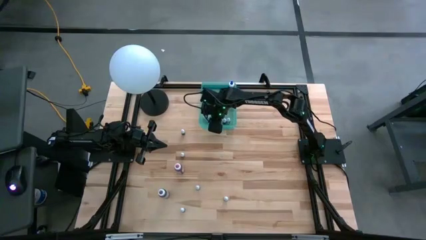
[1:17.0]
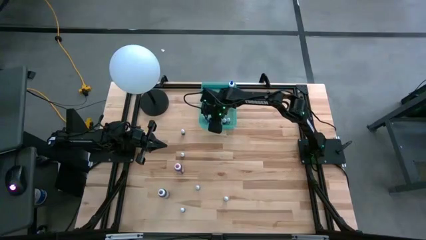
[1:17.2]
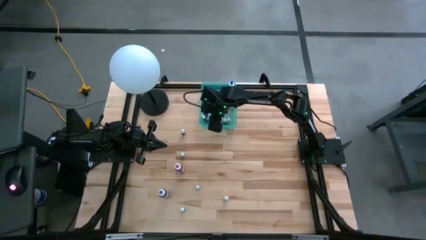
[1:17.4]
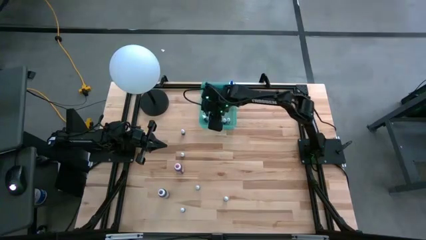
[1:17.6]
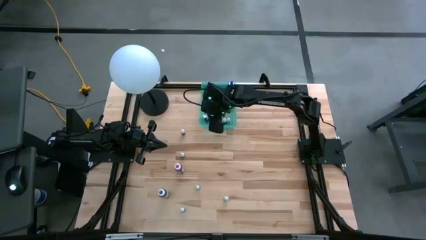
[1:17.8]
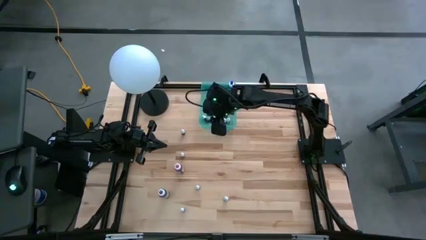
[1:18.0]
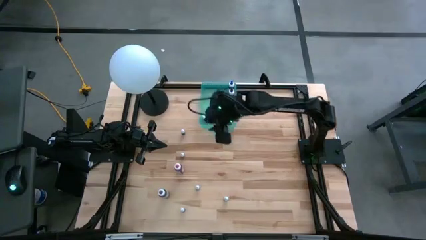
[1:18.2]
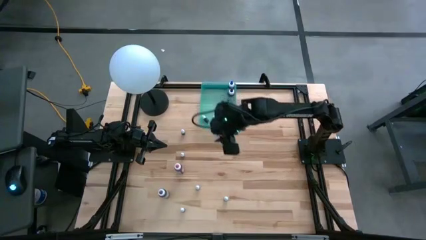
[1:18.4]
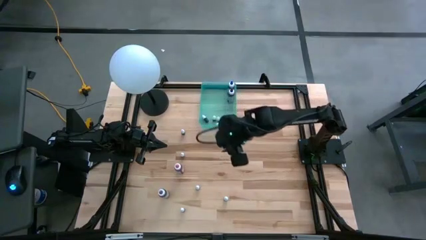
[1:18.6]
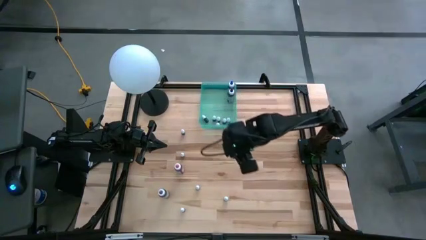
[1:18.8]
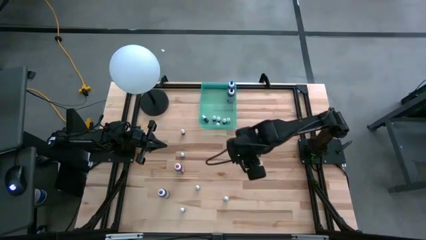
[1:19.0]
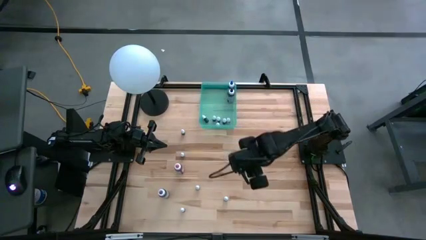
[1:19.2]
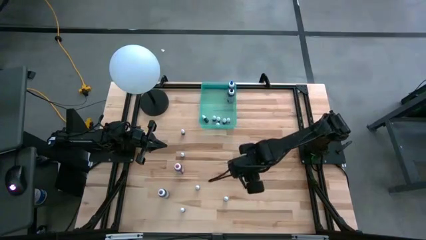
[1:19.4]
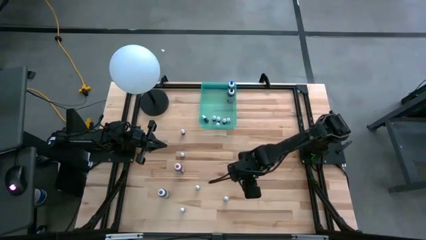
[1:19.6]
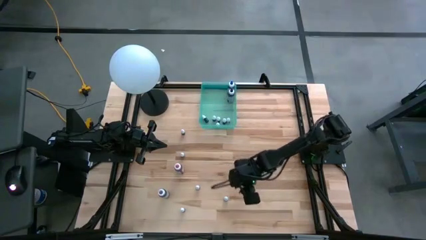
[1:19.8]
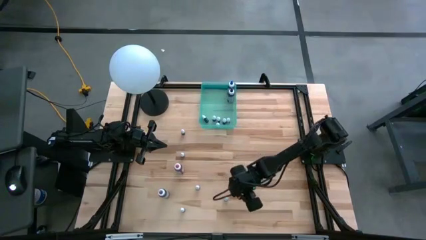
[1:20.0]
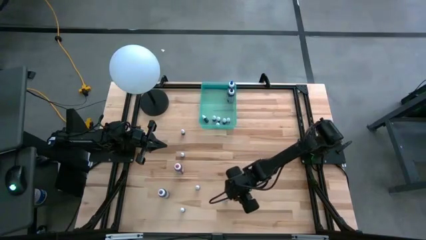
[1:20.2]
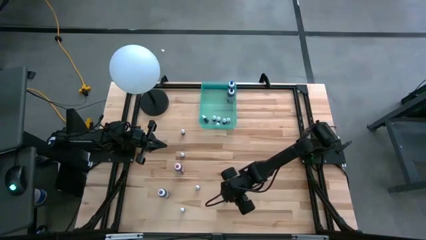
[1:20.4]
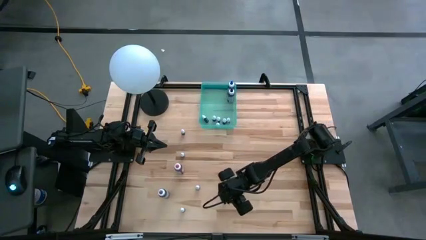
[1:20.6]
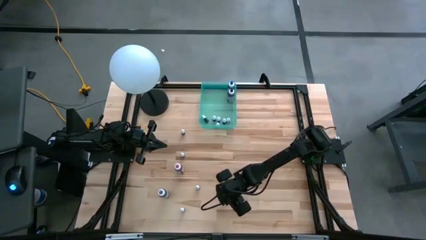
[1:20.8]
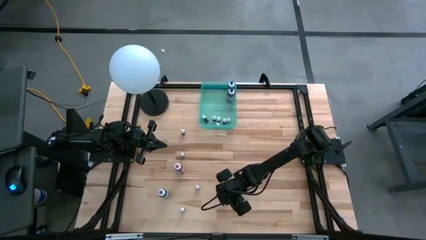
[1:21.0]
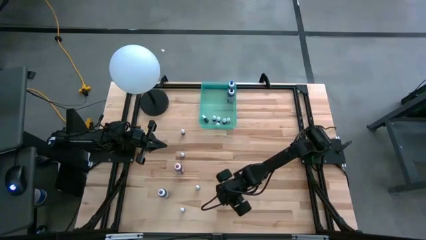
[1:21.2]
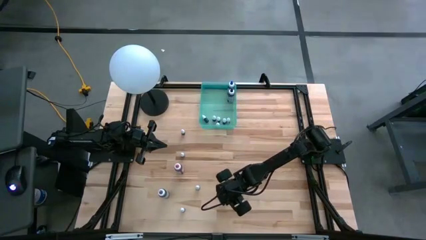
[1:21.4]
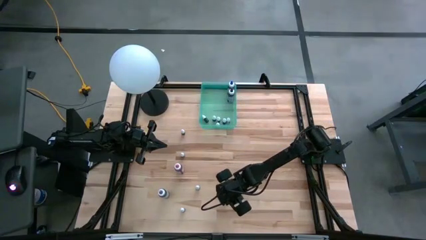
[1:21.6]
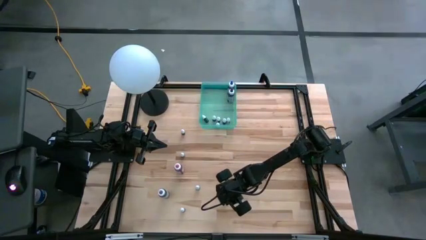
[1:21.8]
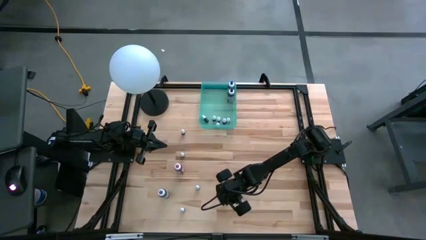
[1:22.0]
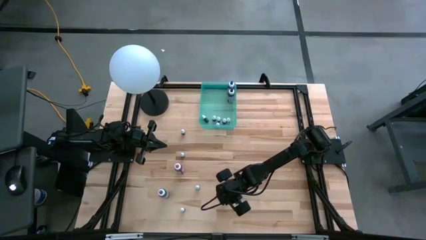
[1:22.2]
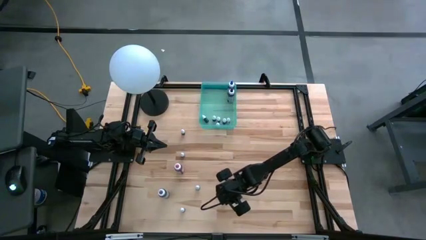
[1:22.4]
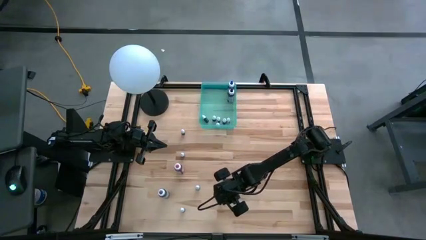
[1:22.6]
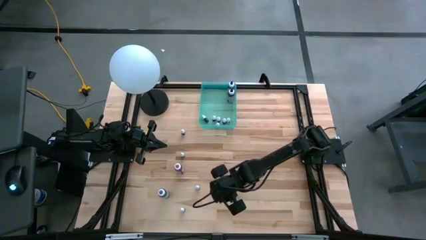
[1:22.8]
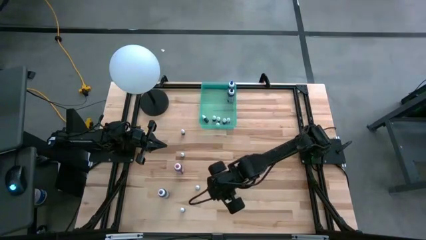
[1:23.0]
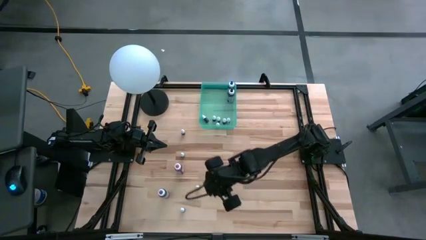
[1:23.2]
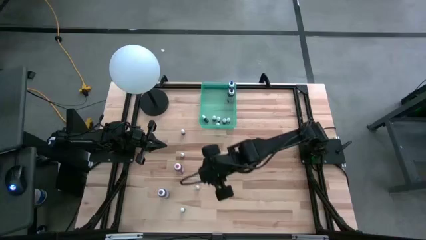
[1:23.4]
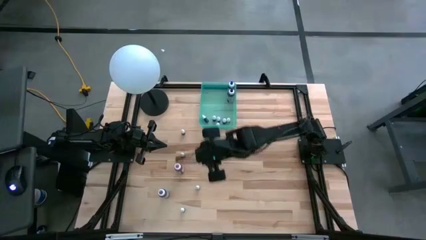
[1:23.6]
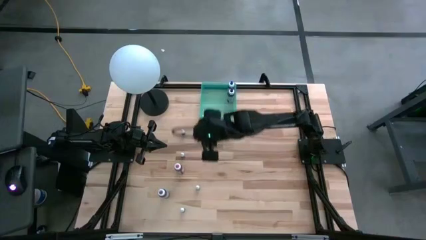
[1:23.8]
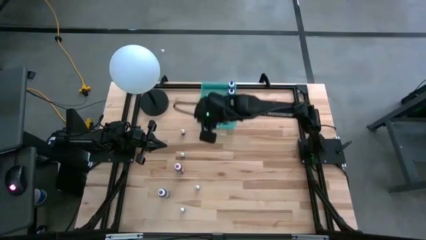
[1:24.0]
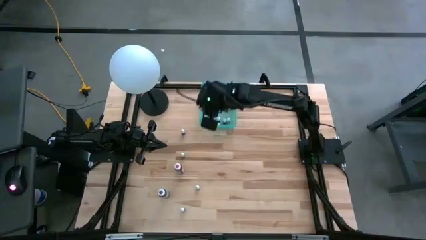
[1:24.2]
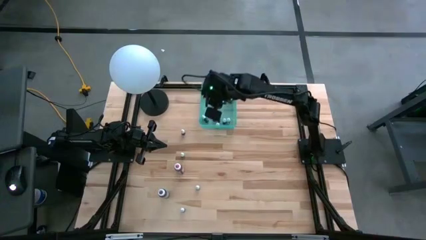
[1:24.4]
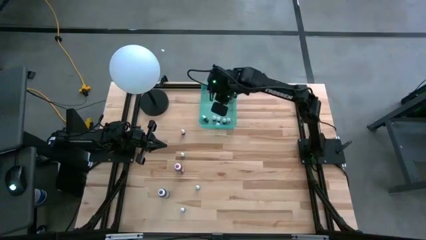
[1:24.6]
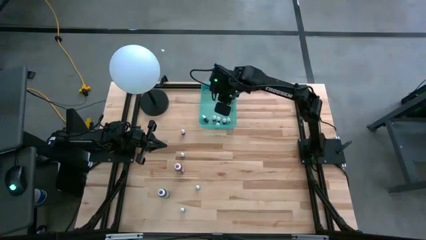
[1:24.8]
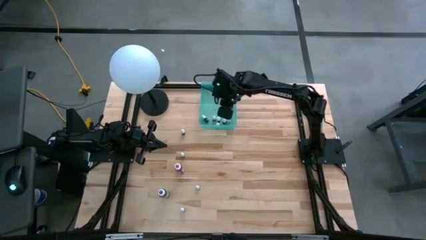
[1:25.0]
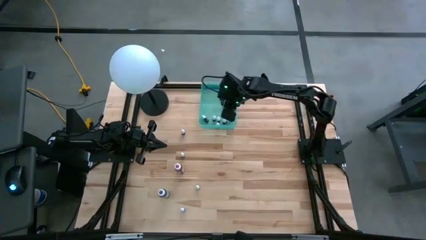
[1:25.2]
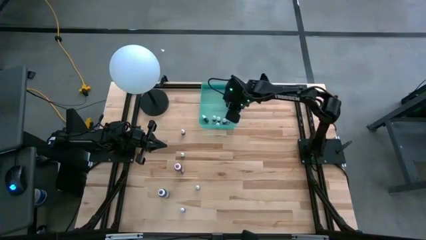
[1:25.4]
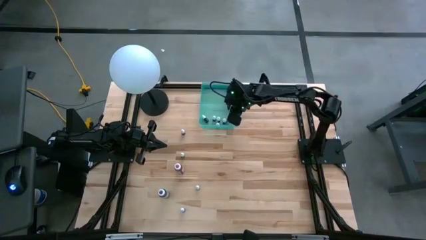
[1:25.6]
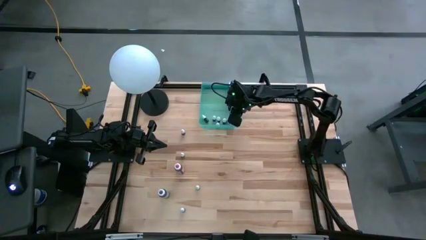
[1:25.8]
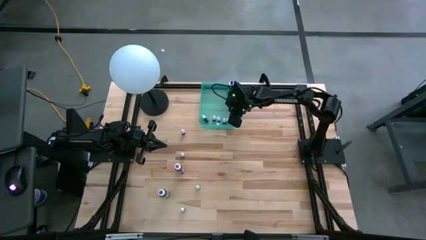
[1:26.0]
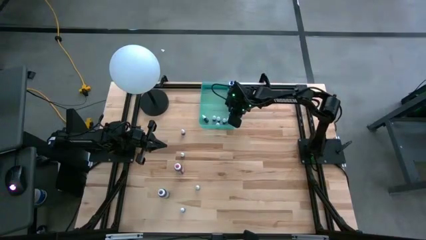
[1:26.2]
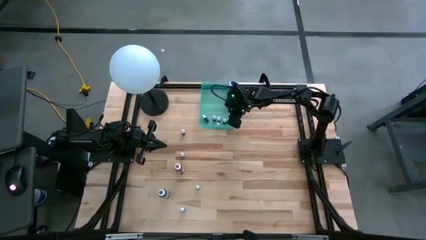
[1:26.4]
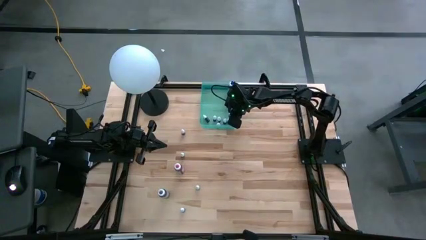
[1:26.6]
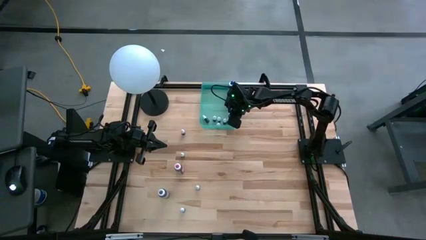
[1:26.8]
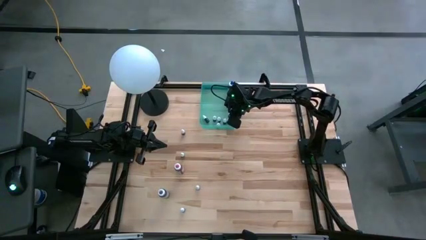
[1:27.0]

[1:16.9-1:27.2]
Task: Pick & Place food coloring
Put the small blue food coloring bottle into the light blue bin

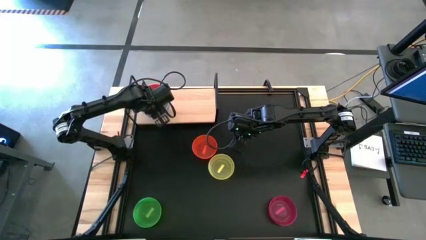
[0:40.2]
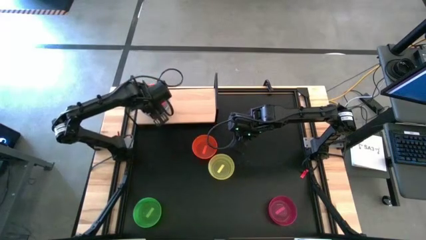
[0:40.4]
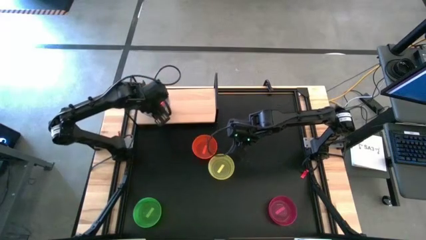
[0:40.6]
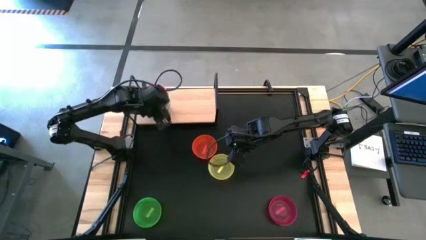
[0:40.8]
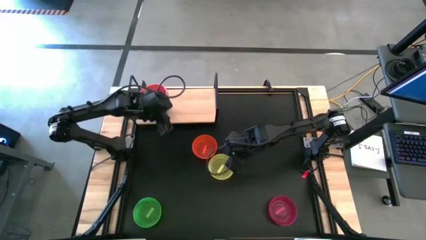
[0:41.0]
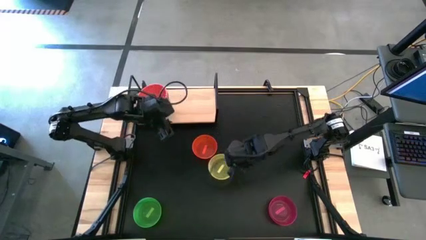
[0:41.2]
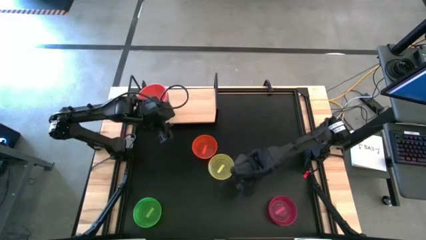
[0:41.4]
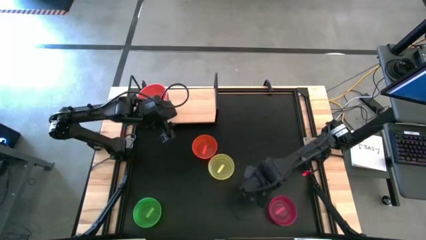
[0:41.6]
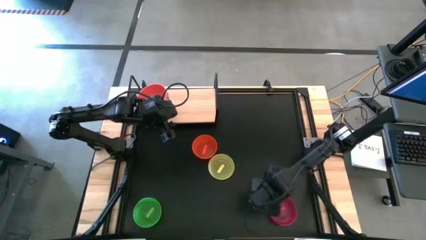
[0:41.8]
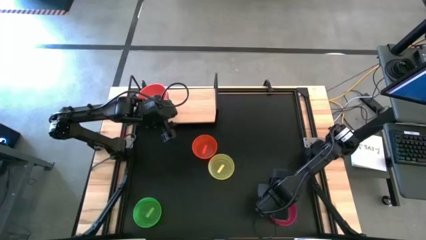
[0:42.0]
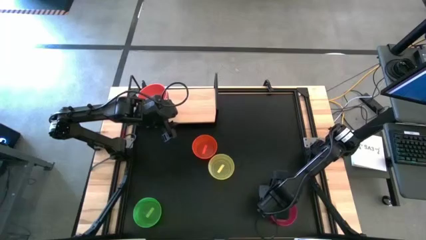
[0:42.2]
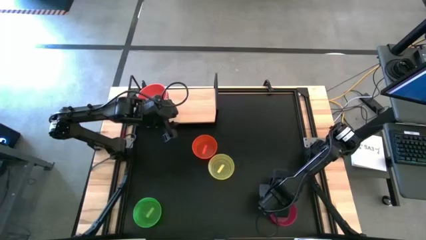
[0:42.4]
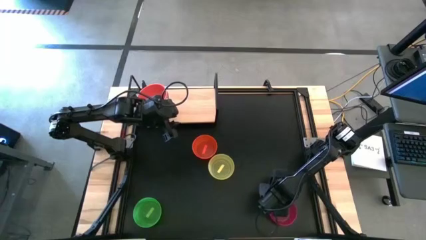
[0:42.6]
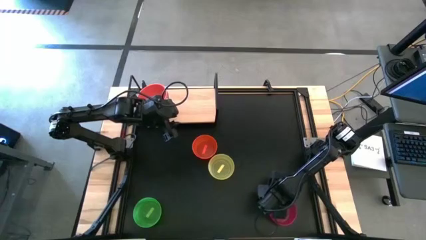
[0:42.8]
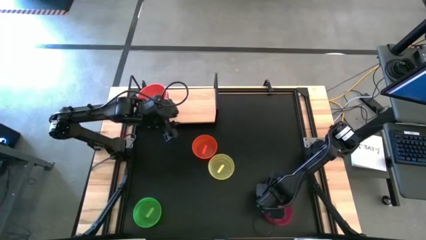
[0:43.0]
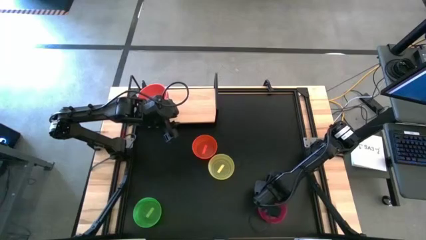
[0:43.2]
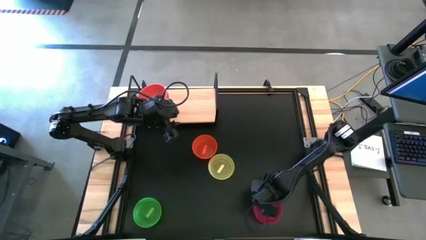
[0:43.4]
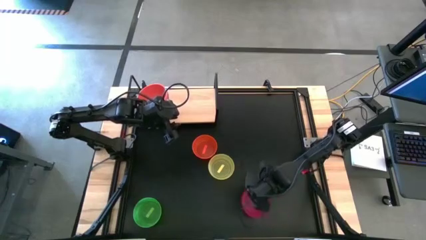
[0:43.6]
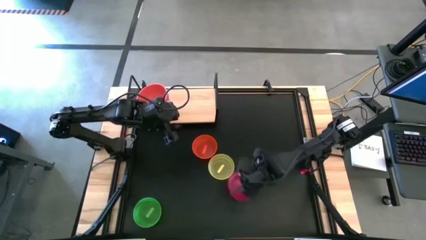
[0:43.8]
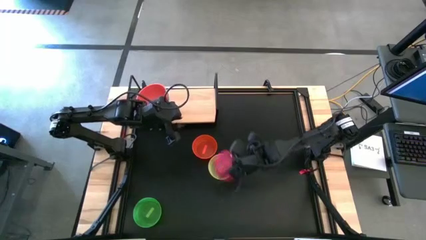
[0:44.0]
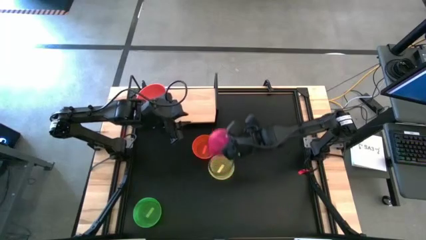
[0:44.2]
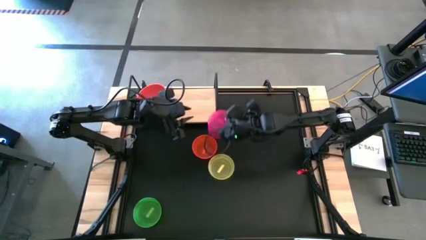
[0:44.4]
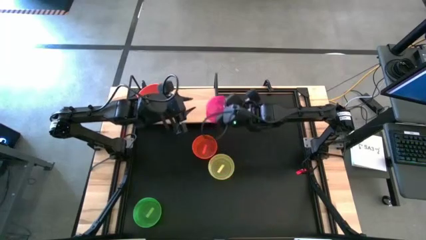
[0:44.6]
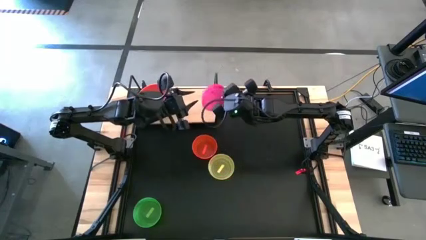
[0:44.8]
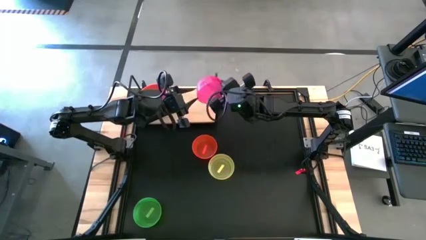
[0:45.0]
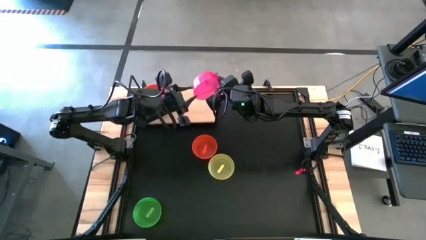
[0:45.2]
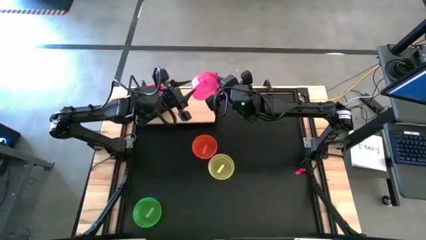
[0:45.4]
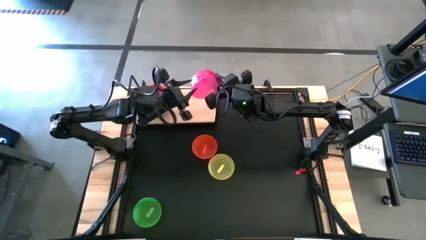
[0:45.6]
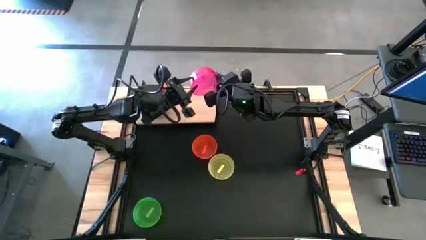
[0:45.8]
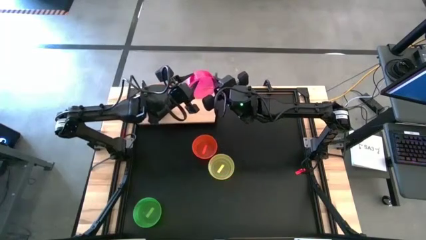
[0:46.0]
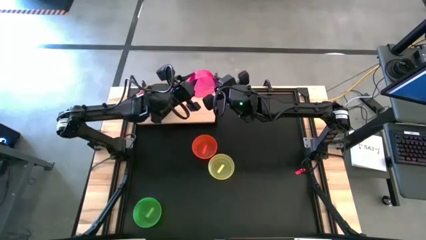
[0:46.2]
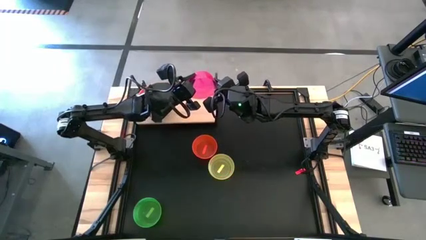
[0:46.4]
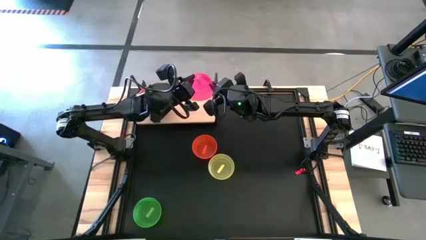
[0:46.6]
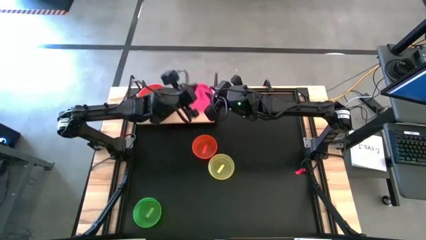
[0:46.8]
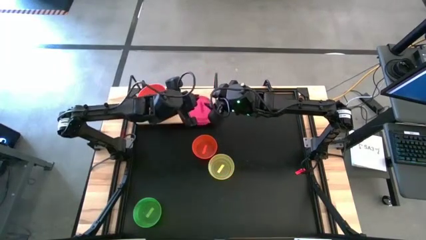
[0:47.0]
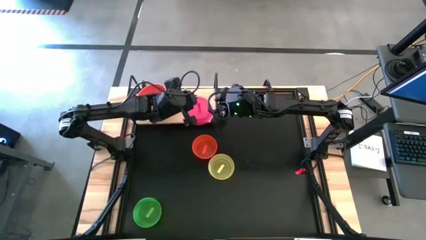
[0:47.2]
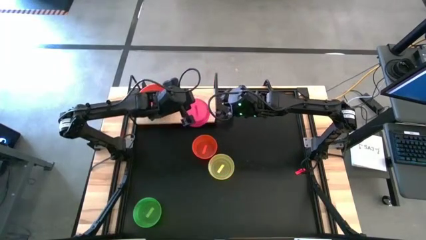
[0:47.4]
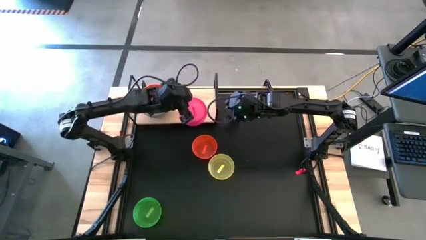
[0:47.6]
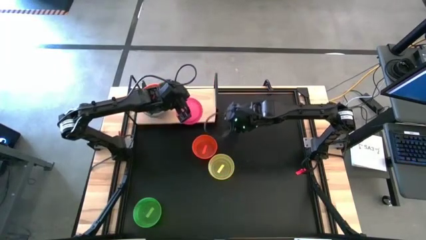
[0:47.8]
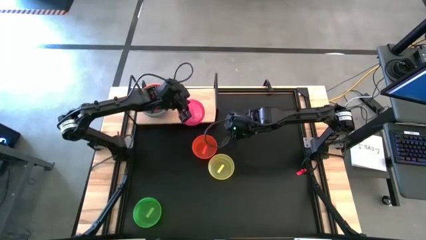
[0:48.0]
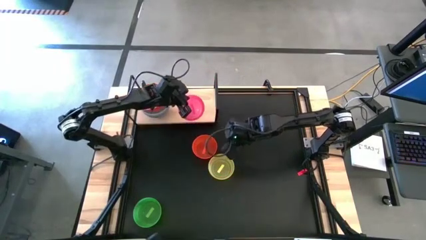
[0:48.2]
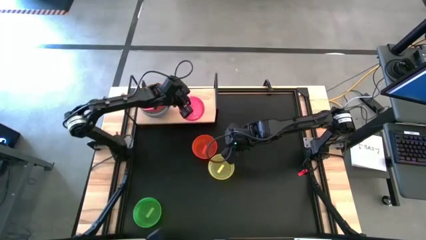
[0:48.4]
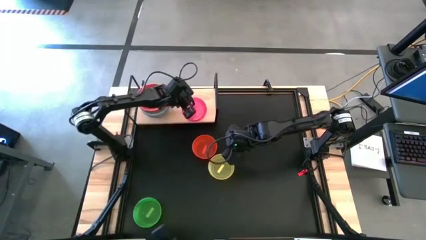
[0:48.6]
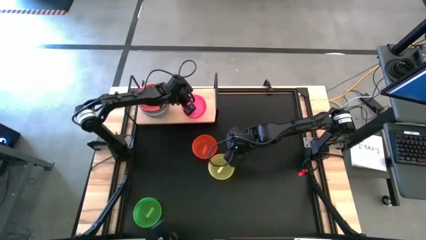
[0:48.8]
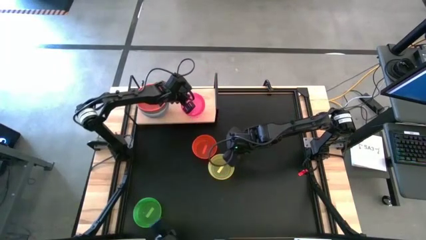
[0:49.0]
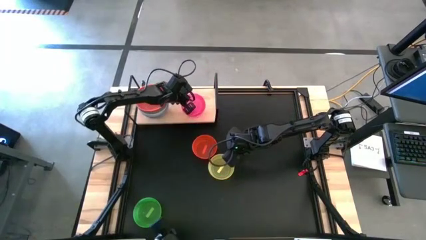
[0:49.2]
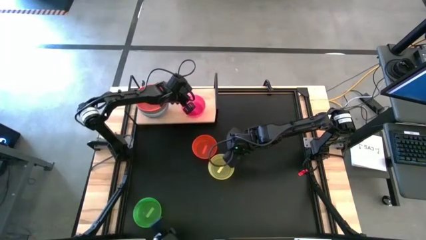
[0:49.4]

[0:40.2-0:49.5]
Task: Place and stack bowls onto a shelf
Put the pink bowl on the shelf
